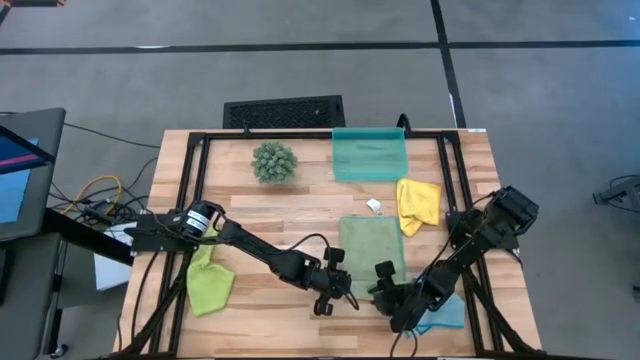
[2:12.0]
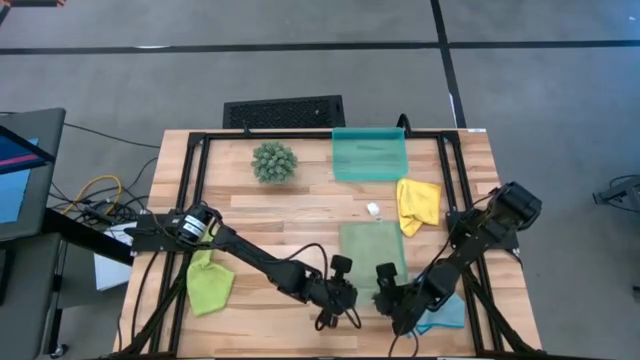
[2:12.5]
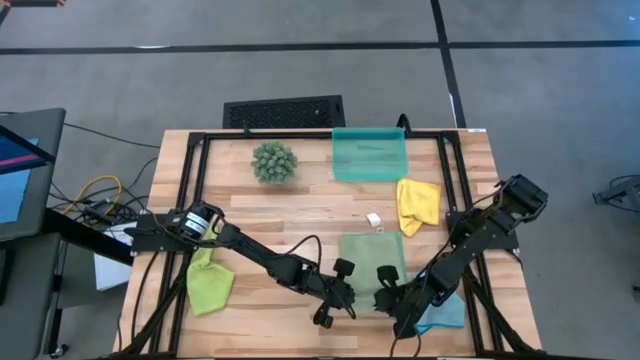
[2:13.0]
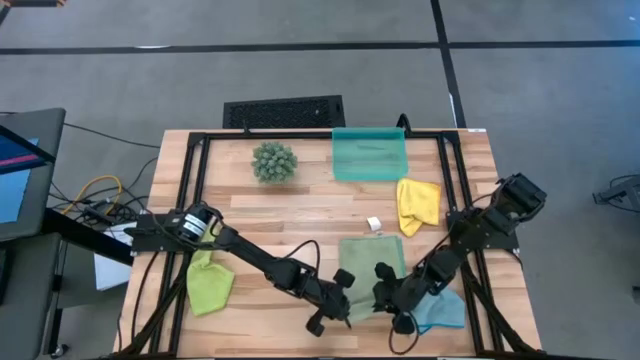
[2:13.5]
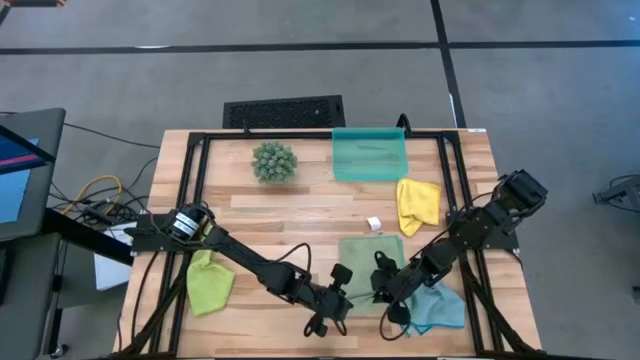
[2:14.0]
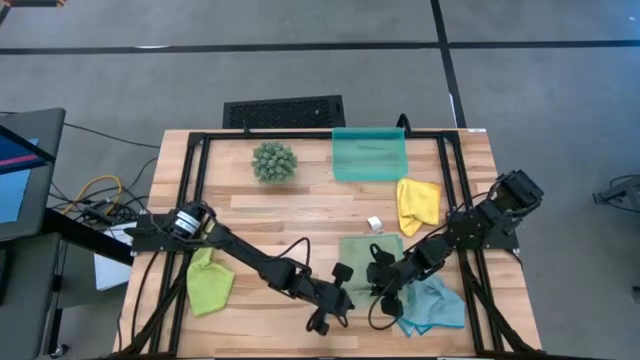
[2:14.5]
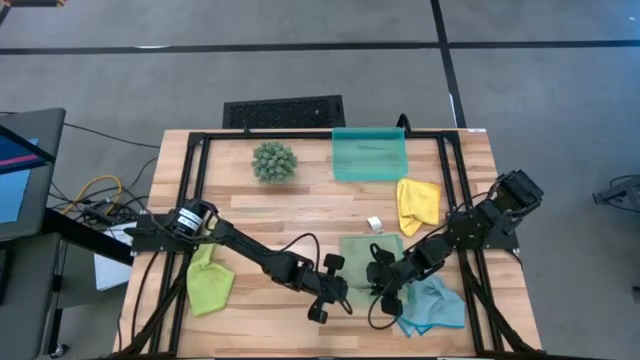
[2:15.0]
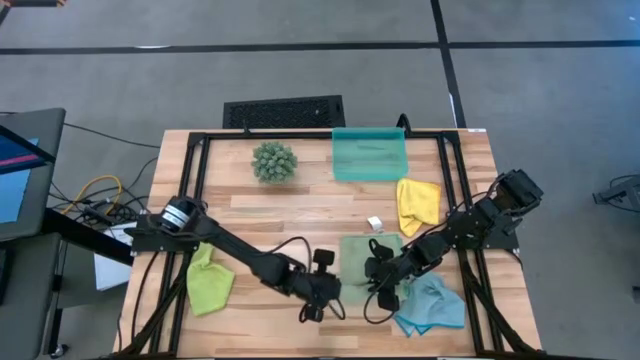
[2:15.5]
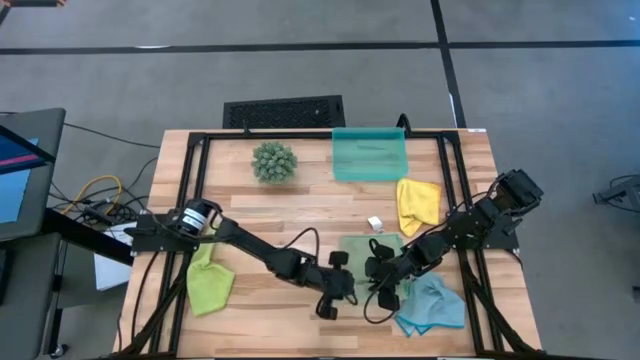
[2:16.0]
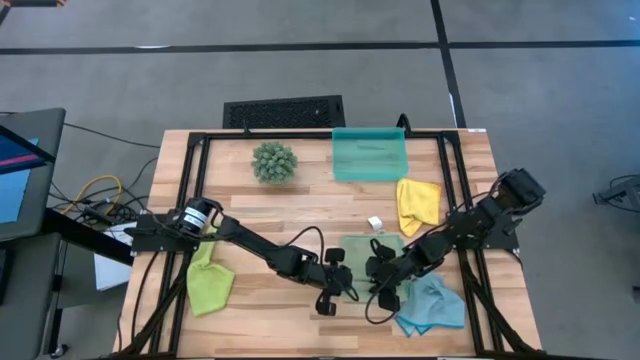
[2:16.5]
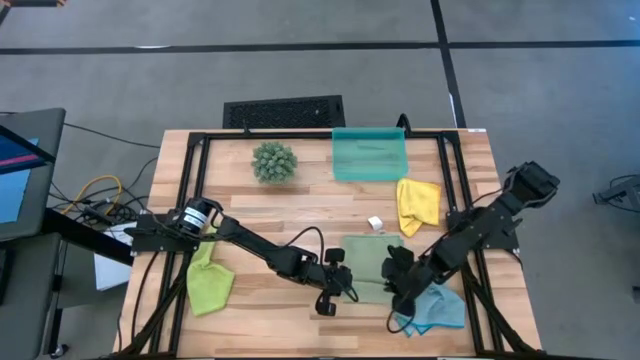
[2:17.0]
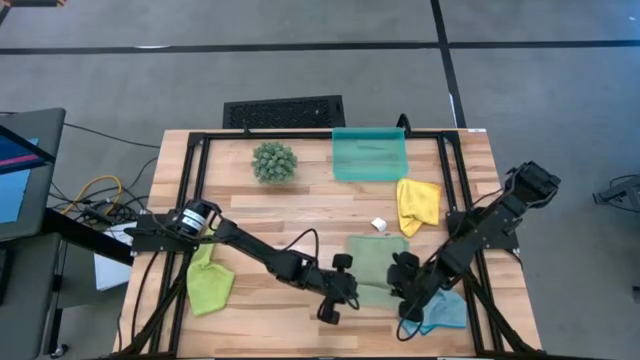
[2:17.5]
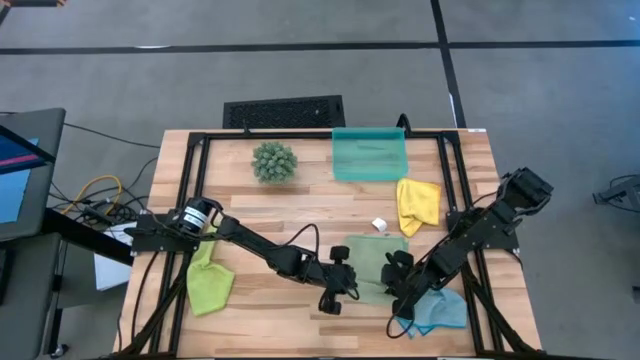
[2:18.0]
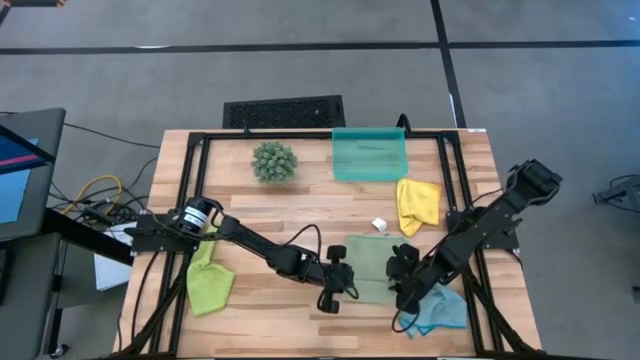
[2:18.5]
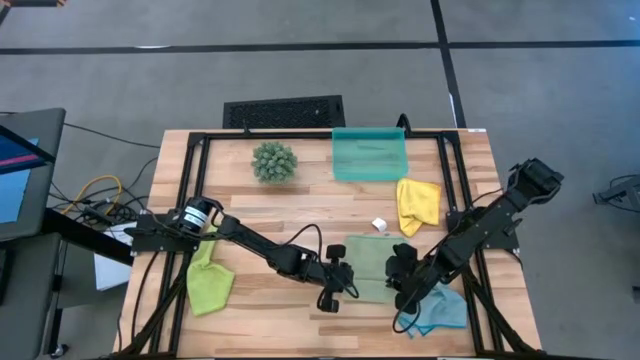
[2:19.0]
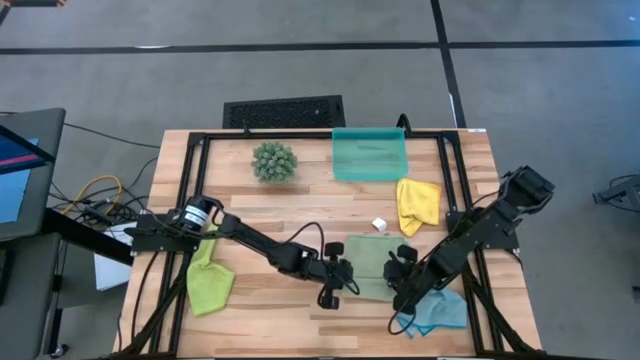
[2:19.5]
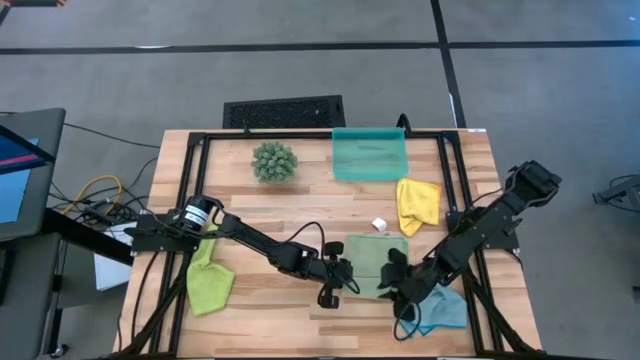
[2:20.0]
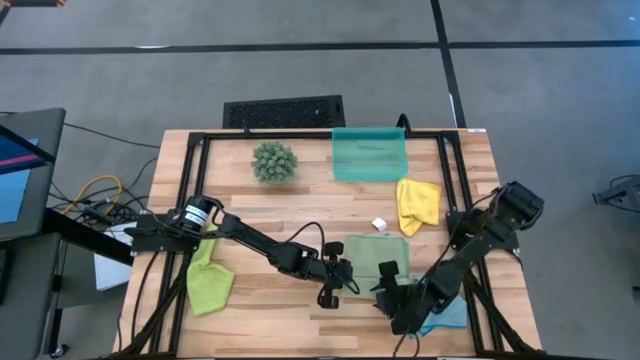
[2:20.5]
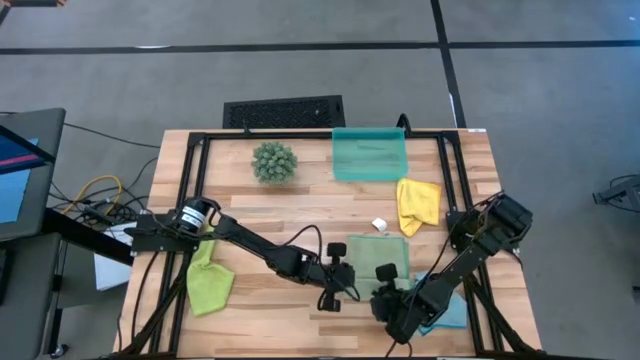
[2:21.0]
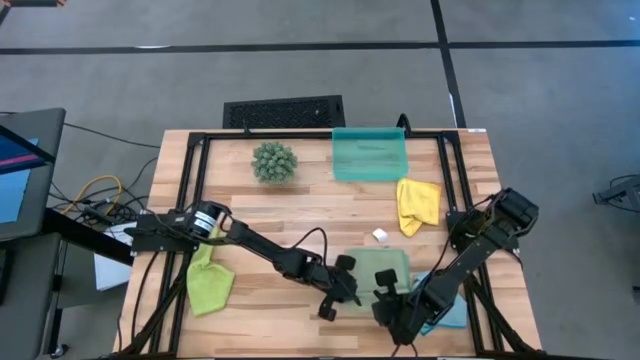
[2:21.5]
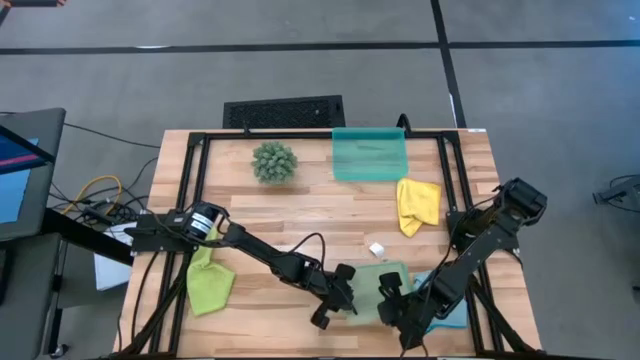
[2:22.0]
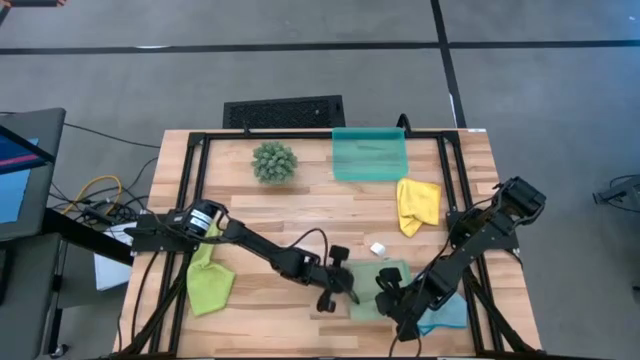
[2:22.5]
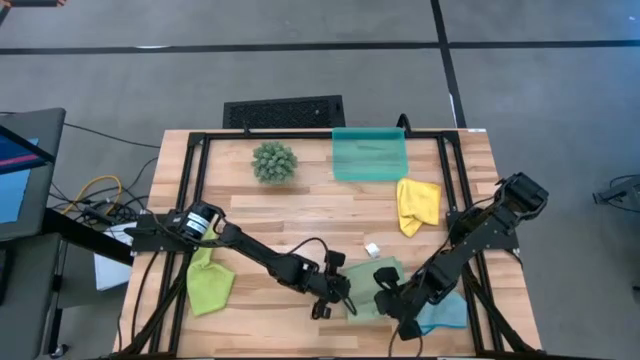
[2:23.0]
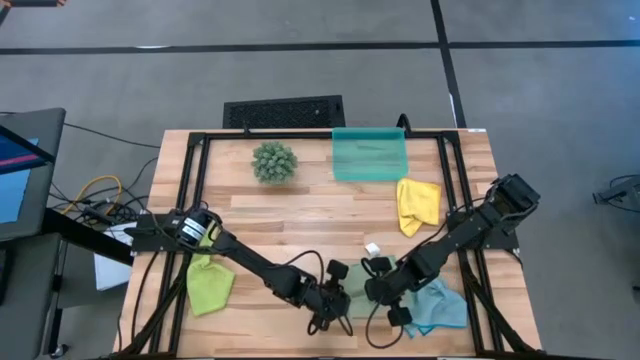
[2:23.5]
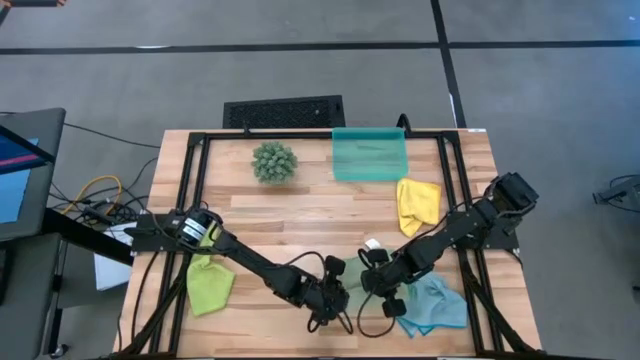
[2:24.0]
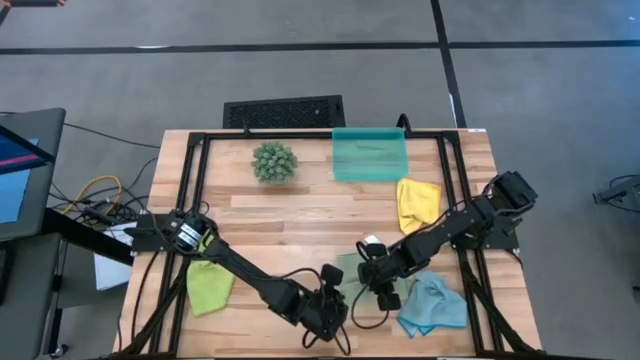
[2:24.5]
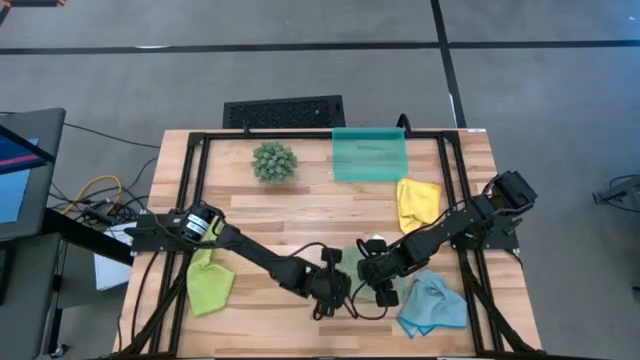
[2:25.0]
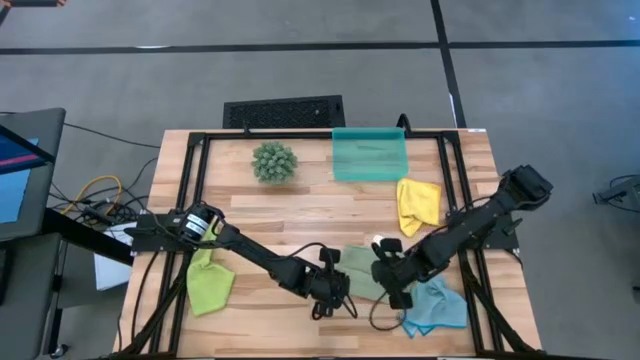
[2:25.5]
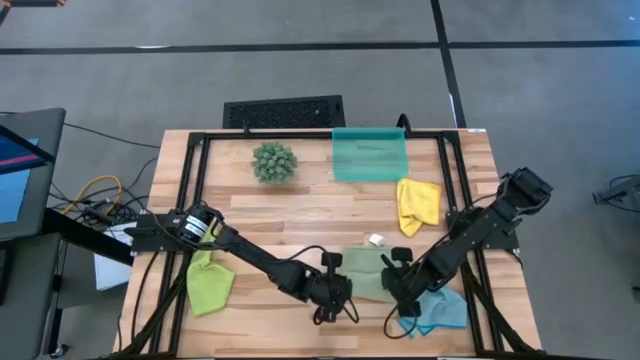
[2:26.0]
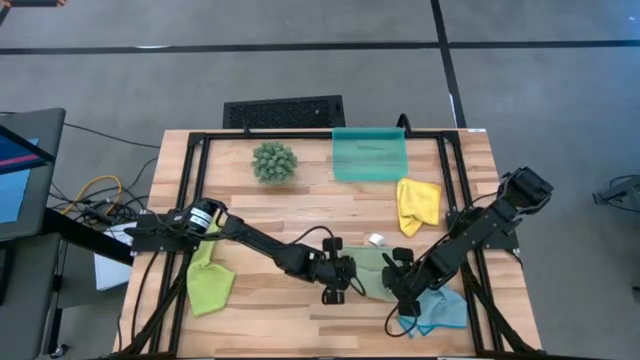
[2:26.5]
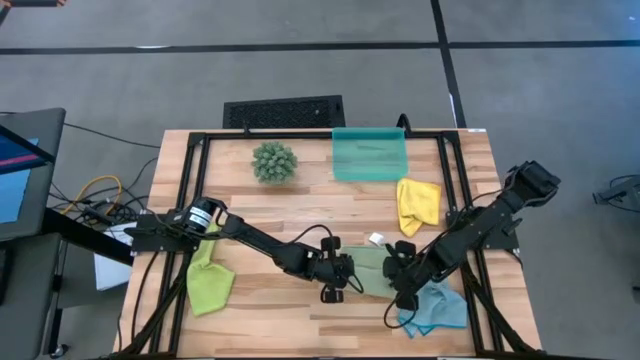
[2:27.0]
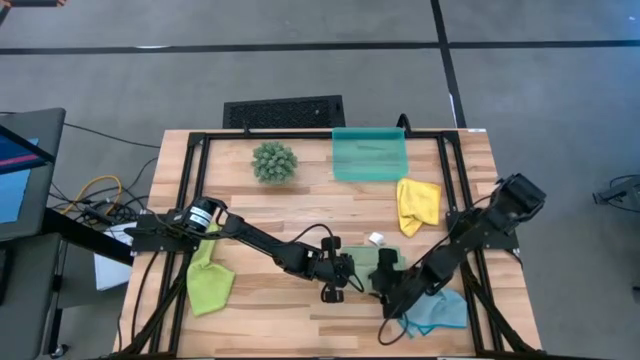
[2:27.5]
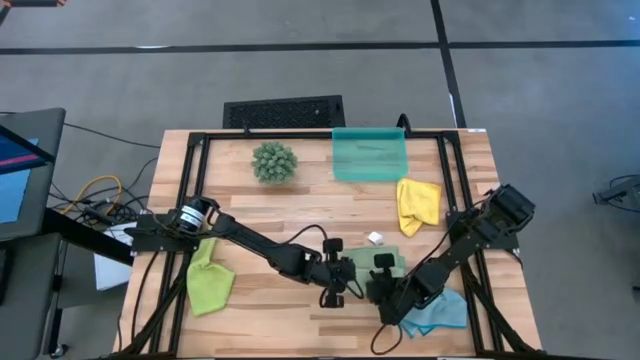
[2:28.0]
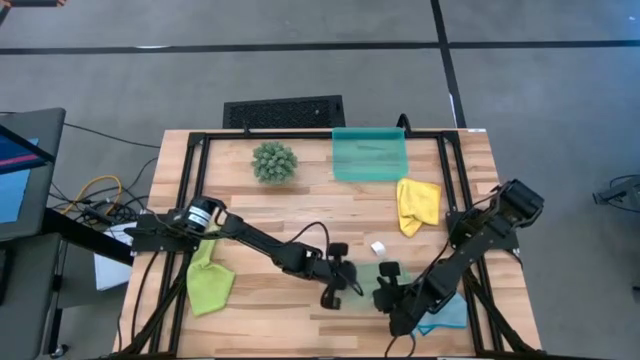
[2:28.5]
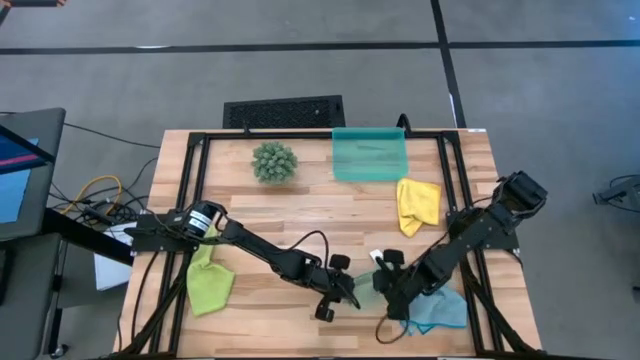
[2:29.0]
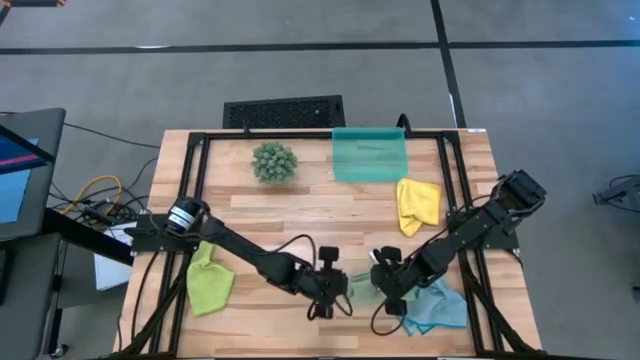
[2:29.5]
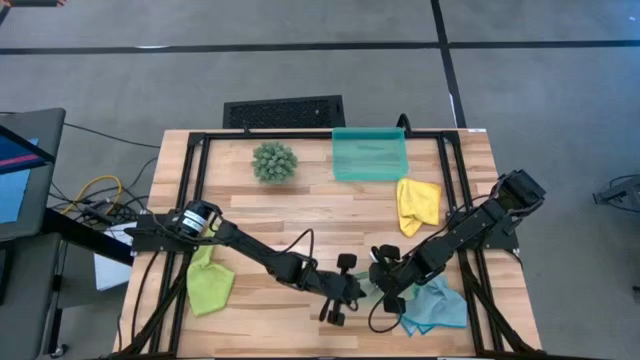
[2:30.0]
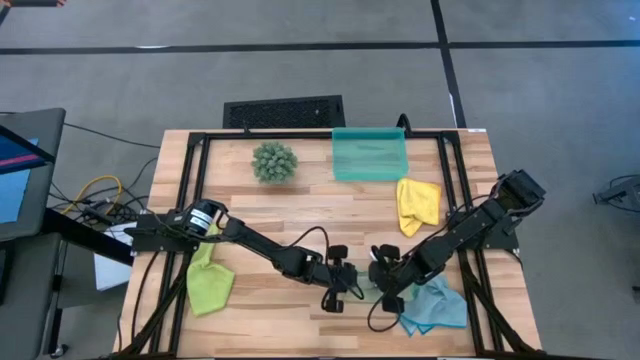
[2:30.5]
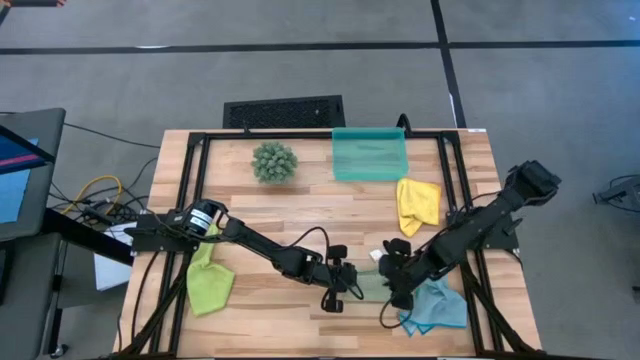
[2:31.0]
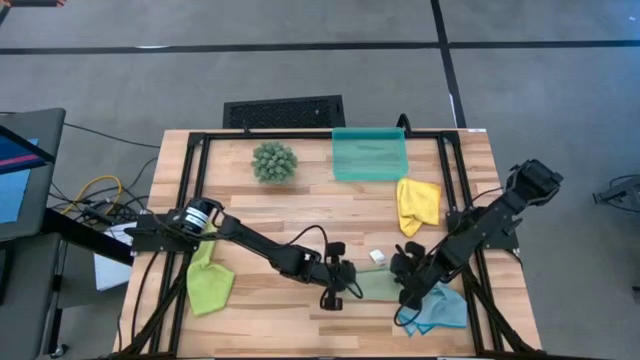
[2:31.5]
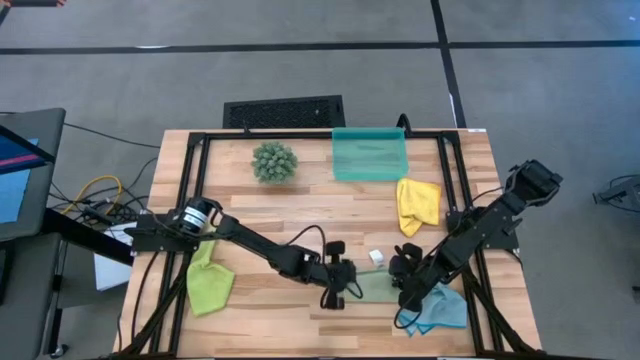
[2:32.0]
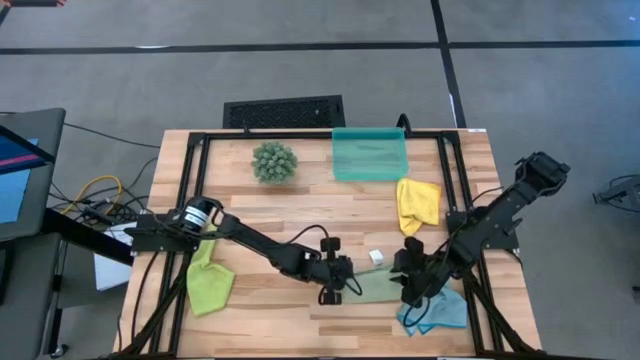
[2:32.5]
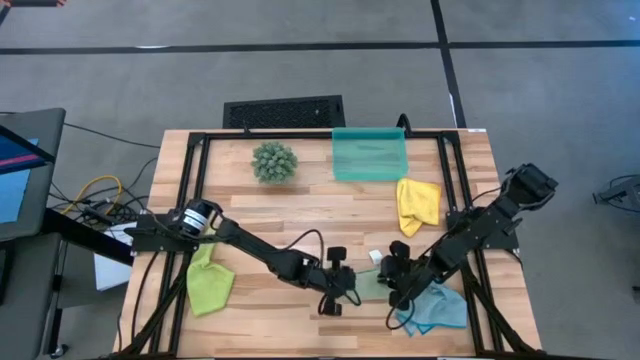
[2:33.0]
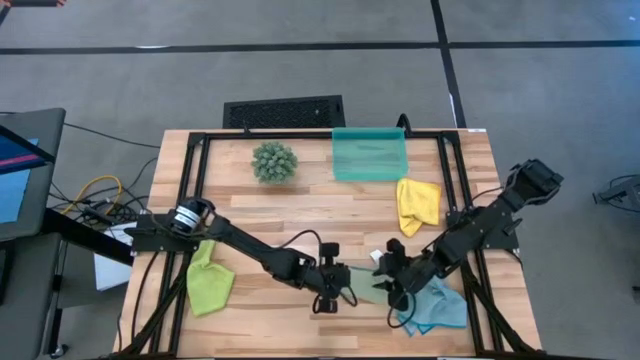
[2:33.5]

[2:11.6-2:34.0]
Task: Roll microfiber towels into tight, uniform cylinder then place into a basket
Roll the dark green microfiber cloth
